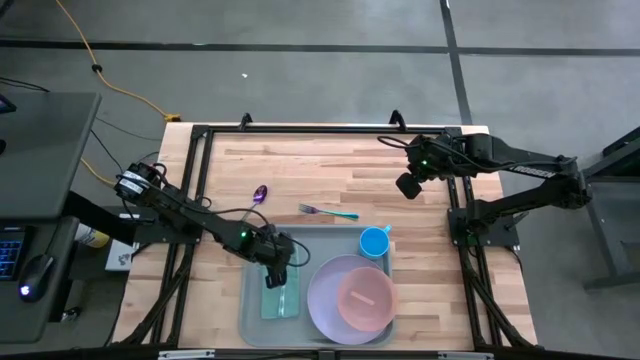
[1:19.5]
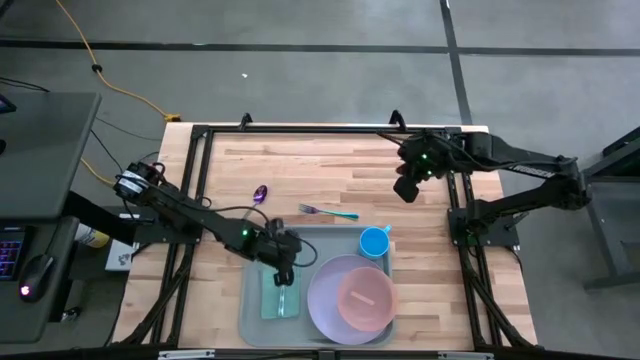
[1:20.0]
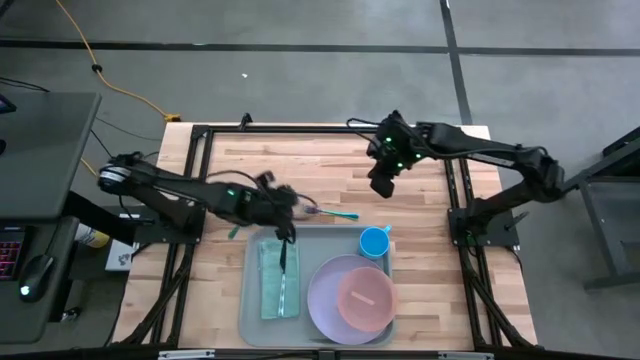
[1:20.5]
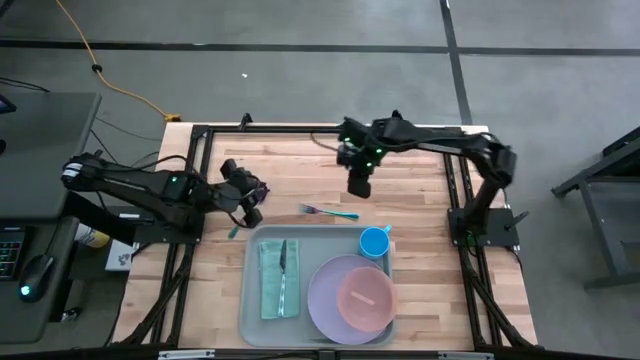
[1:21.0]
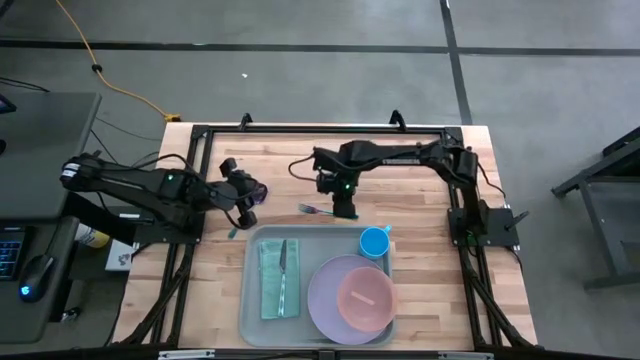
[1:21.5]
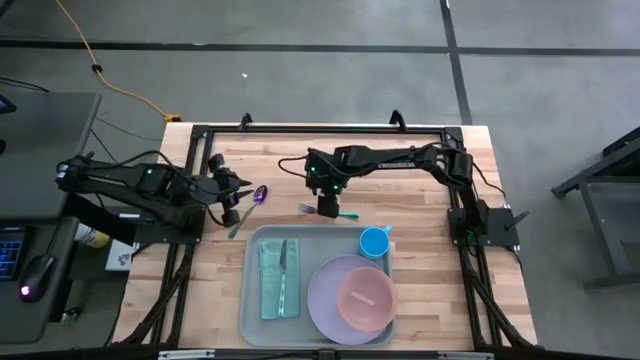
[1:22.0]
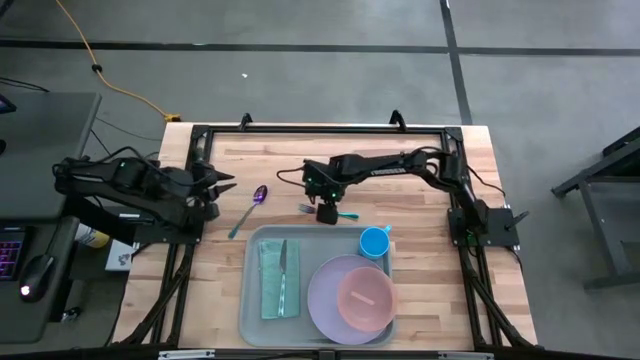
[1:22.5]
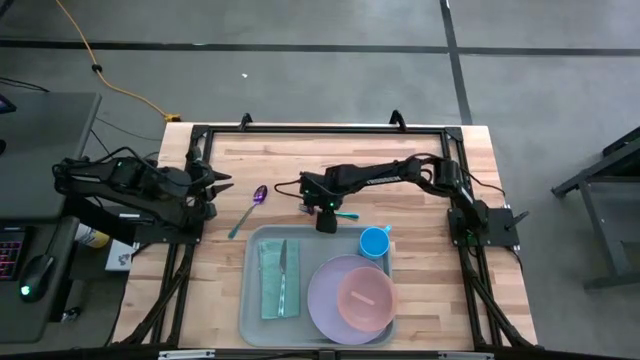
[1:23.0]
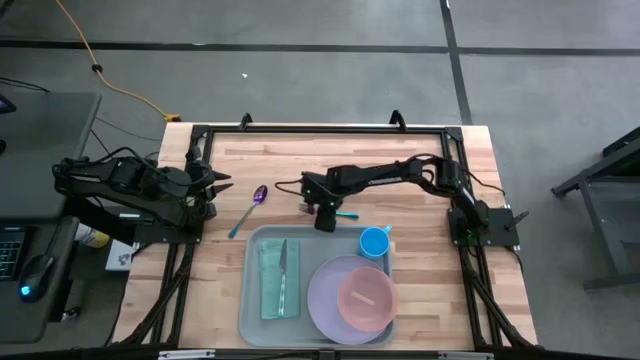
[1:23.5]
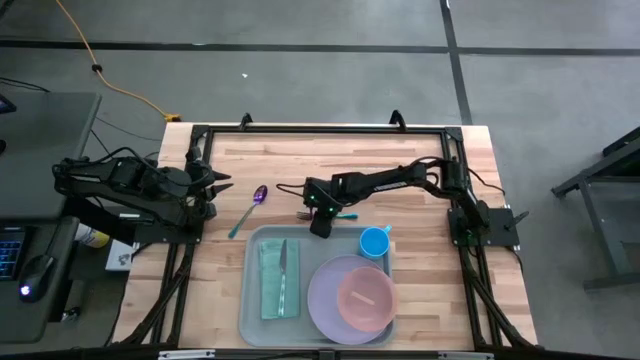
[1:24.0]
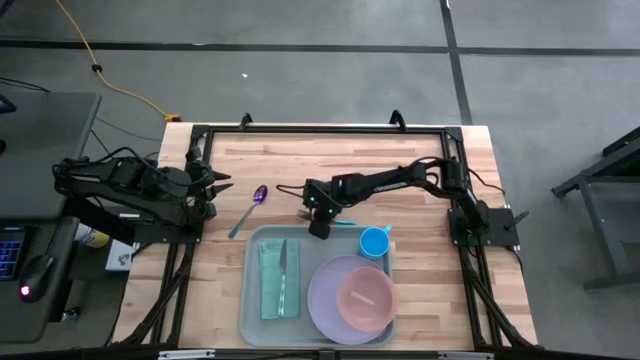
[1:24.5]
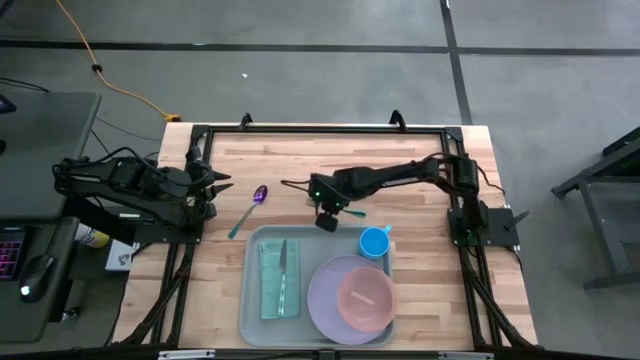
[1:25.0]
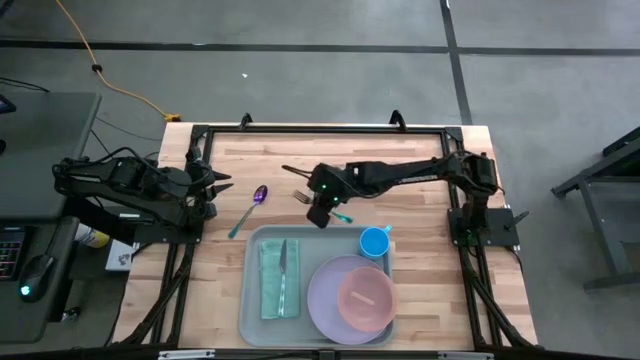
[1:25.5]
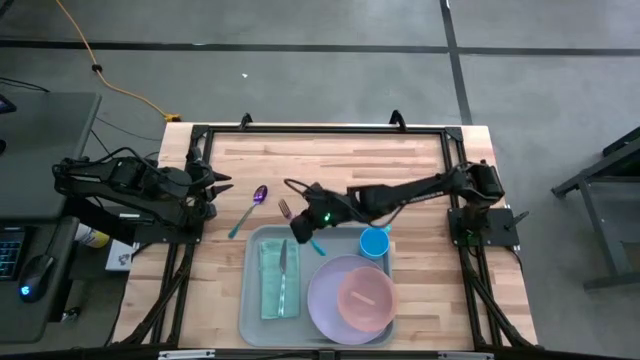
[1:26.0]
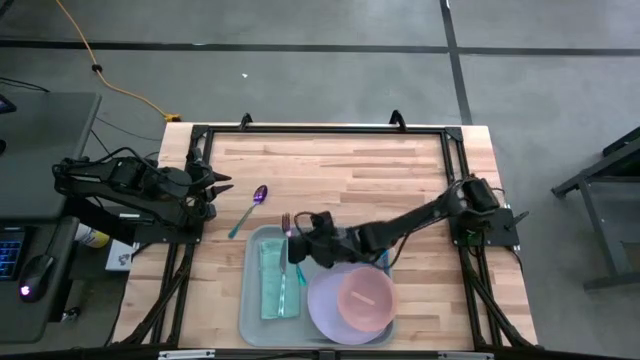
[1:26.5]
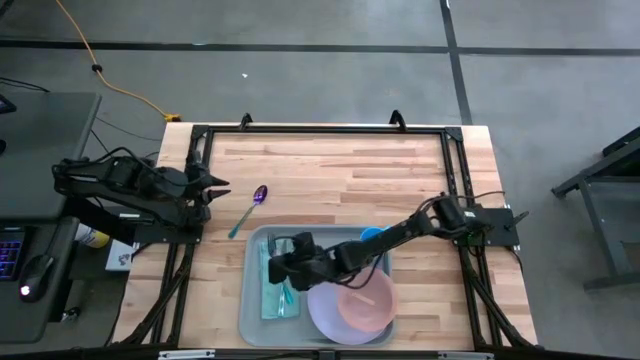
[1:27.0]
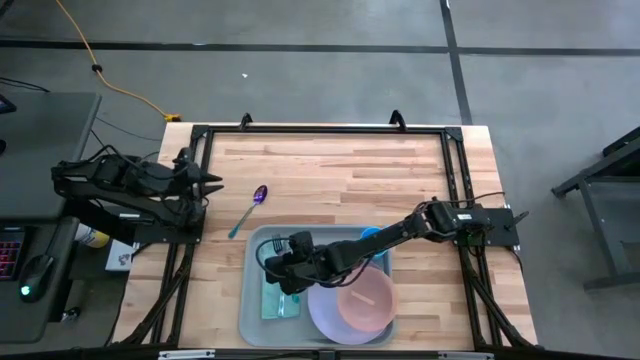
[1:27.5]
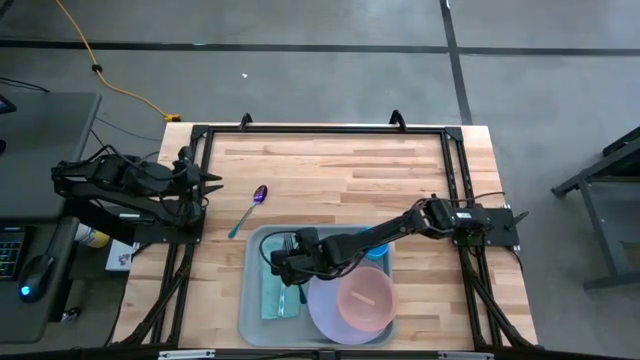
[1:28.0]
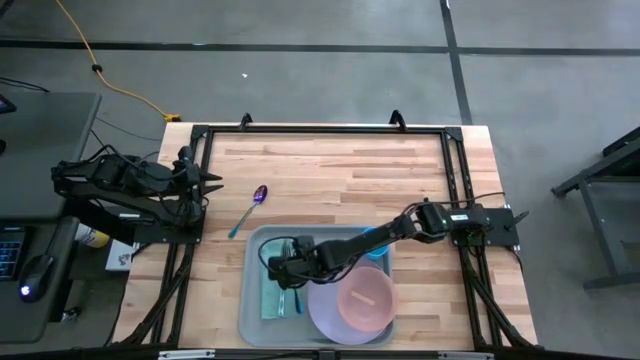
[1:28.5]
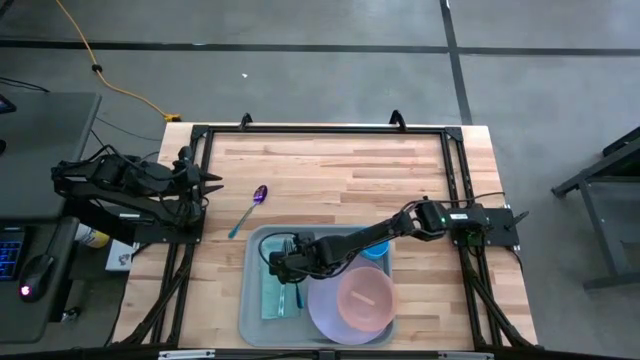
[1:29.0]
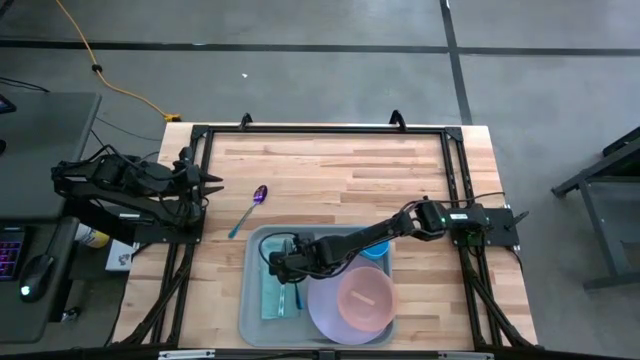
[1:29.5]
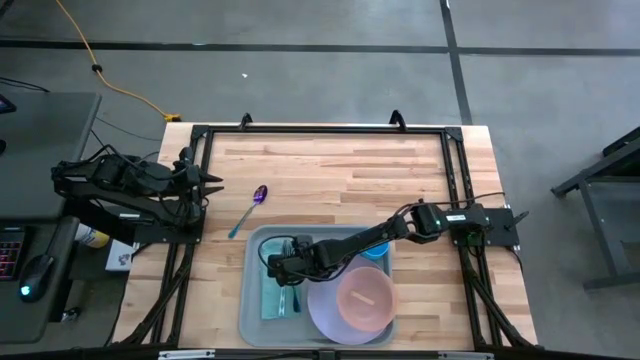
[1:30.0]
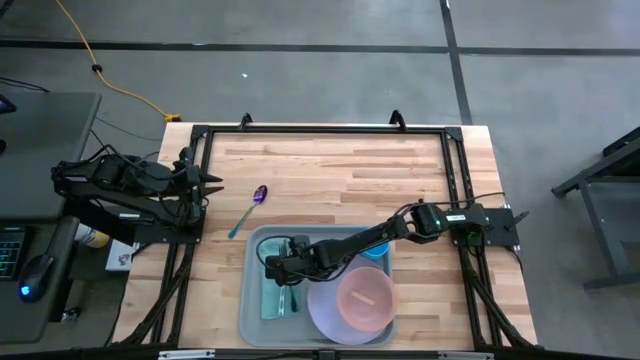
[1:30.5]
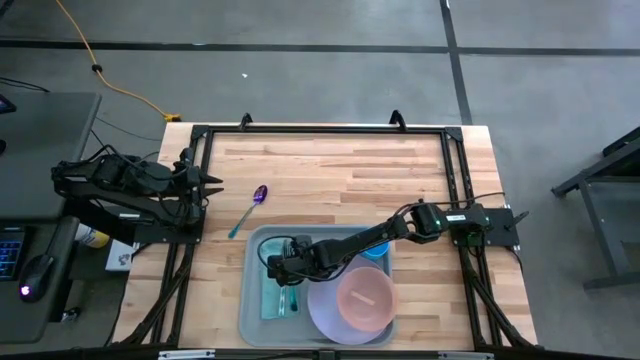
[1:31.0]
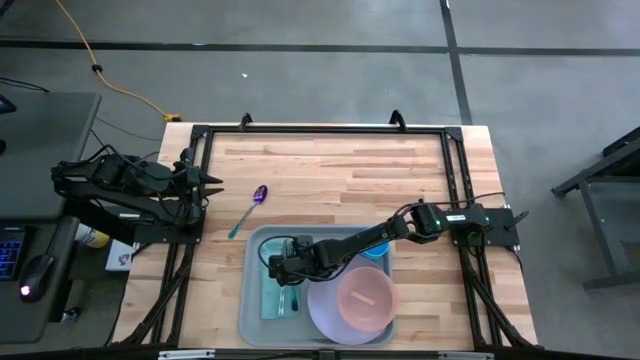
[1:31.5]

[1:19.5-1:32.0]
Task: Set up tray
Put the violet fork on the light blue napkin to the right of the green patterned knife

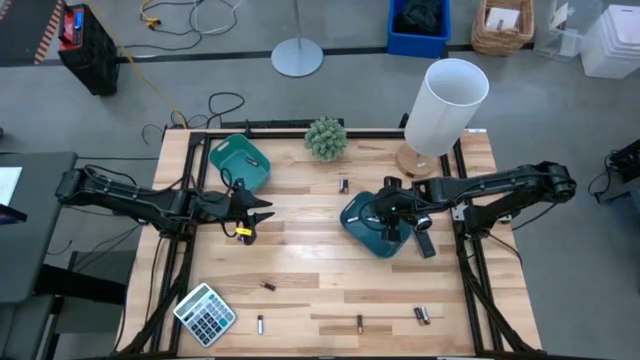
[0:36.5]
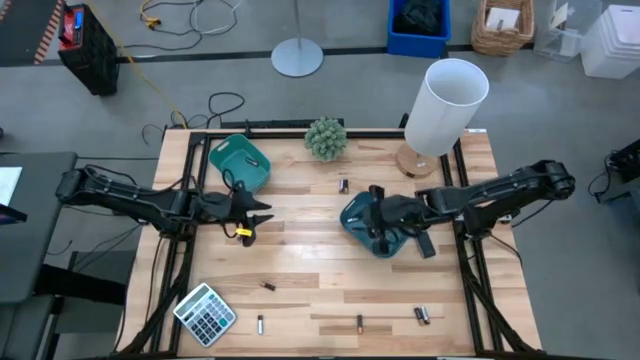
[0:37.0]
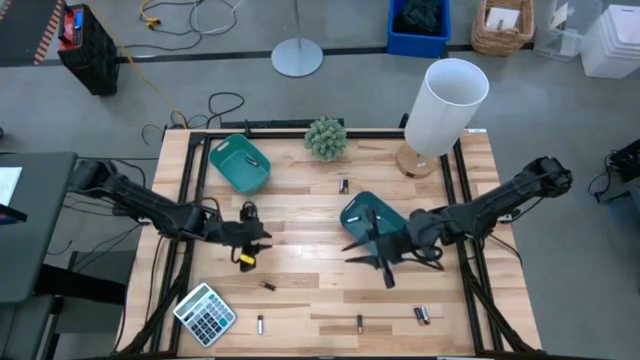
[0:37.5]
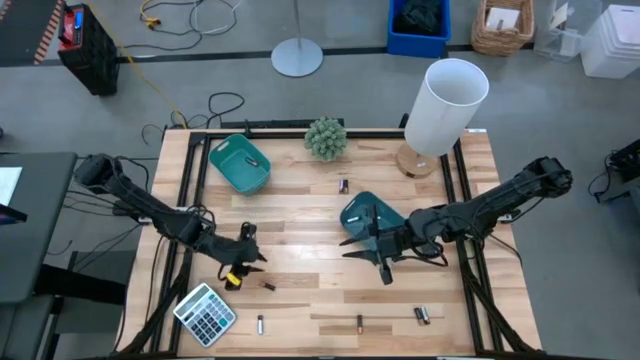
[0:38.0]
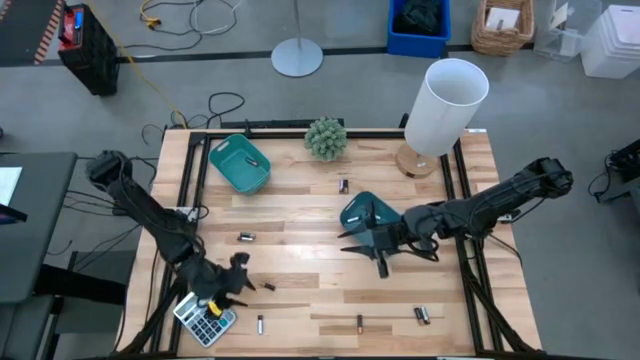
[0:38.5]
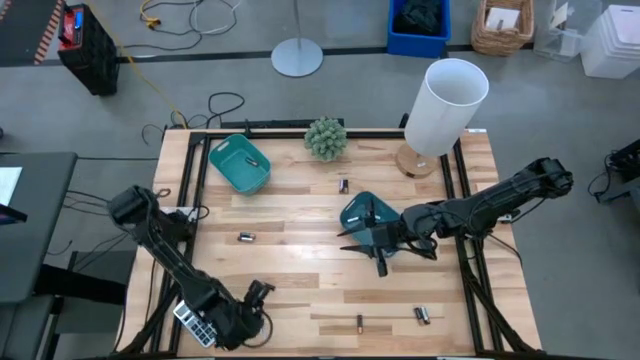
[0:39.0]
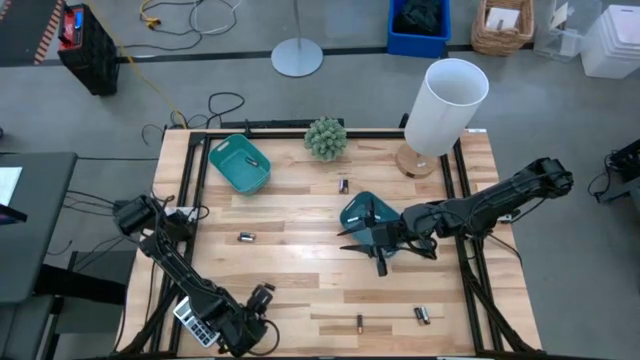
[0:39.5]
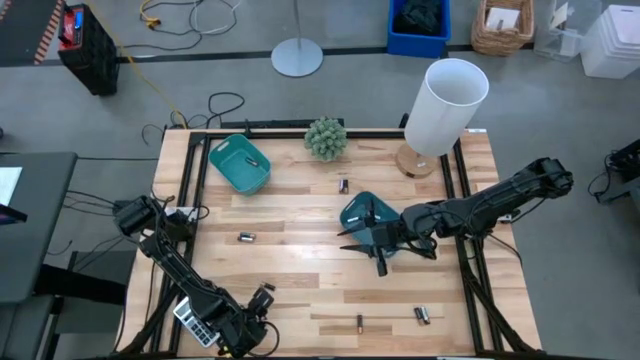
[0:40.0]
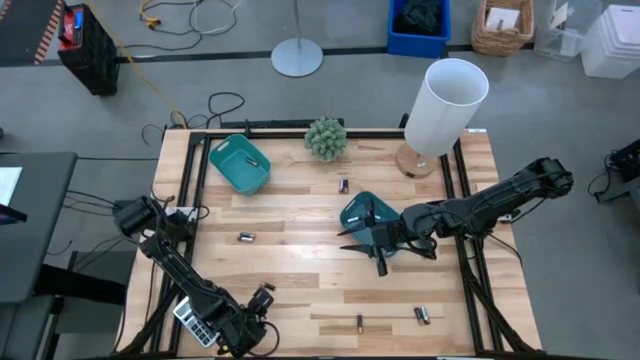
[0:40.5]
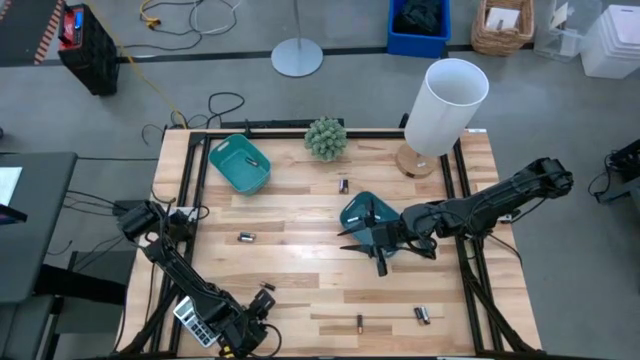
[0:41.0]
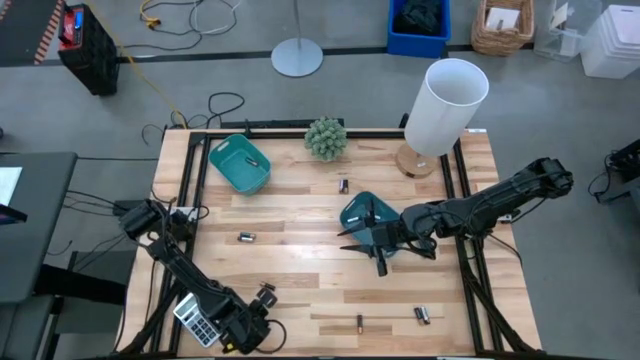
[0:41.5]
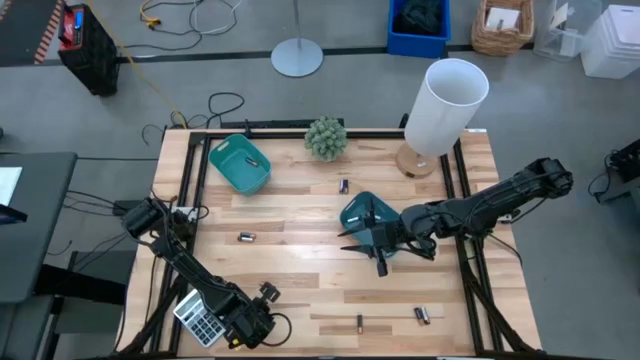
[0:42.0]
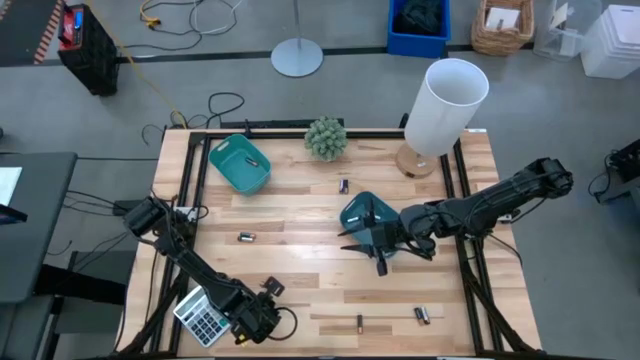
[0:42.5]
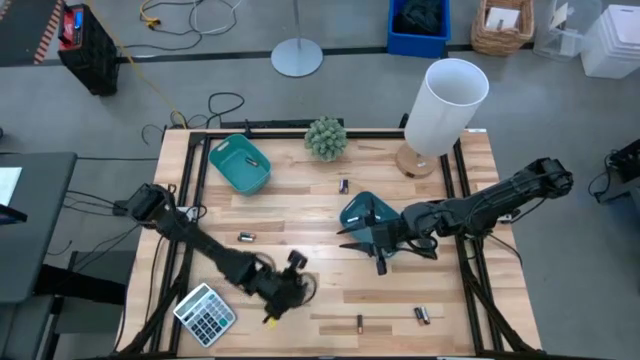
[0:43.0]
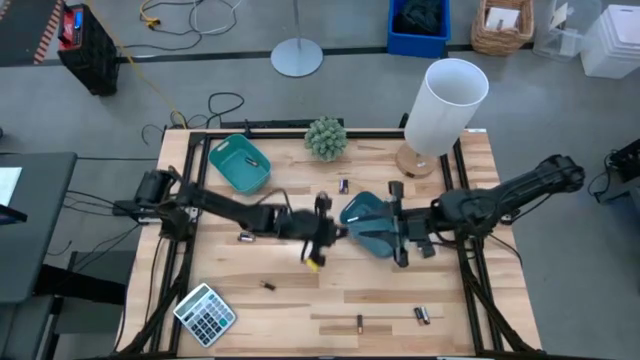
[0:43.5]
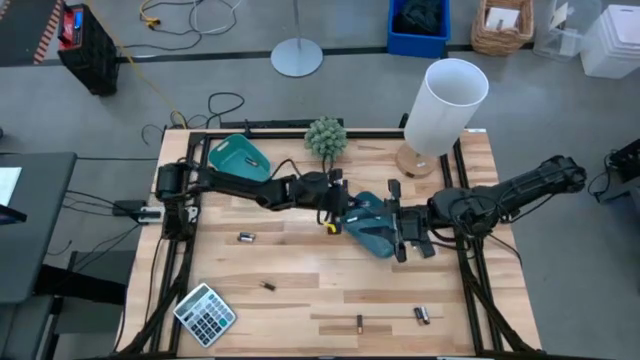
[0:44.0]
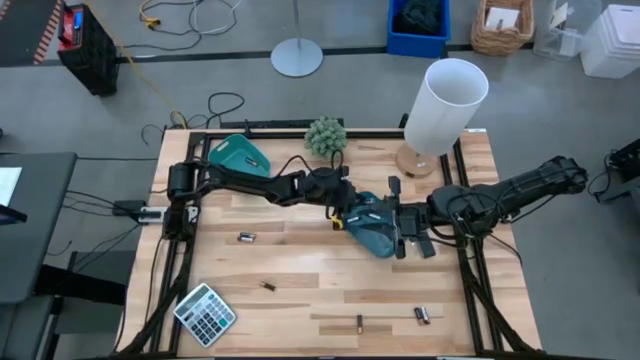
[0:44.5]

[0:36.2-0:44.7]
Task: Sort batteries
Put the silver battery into the blue bin
